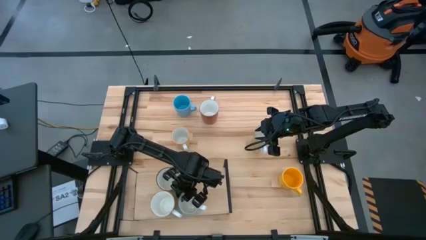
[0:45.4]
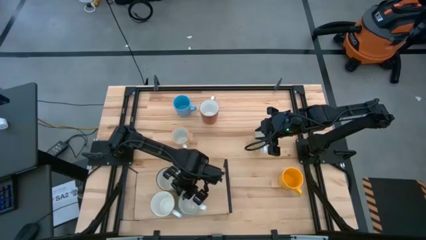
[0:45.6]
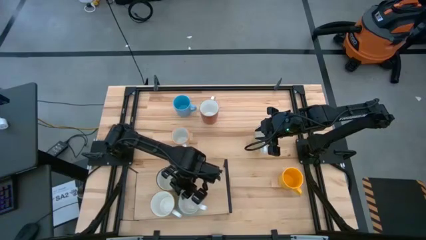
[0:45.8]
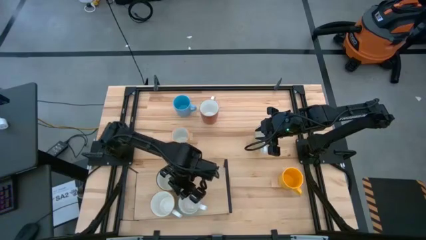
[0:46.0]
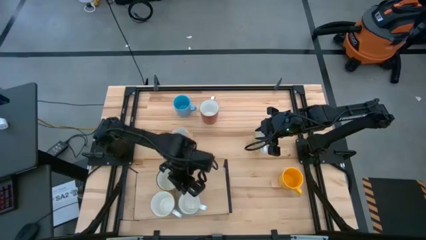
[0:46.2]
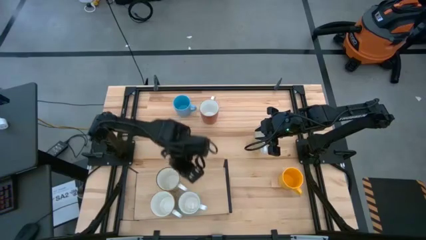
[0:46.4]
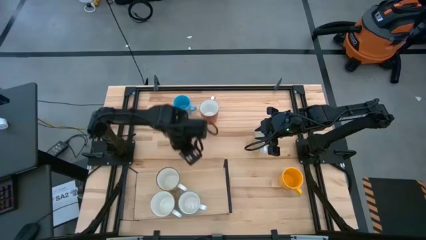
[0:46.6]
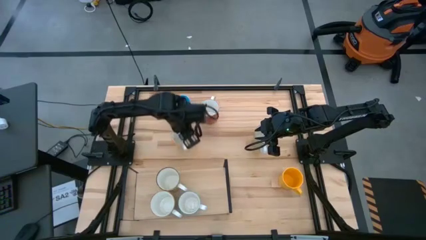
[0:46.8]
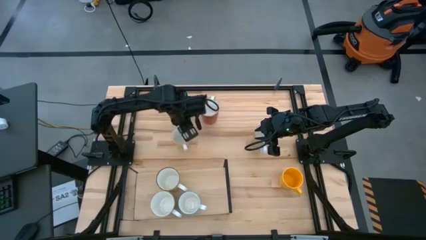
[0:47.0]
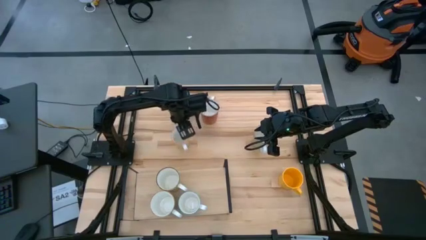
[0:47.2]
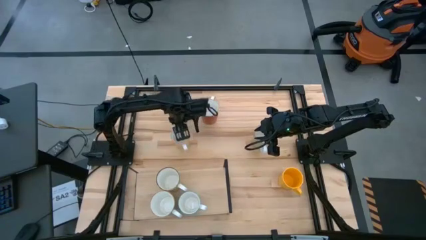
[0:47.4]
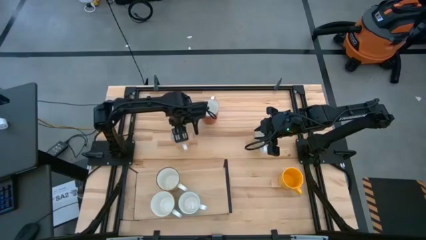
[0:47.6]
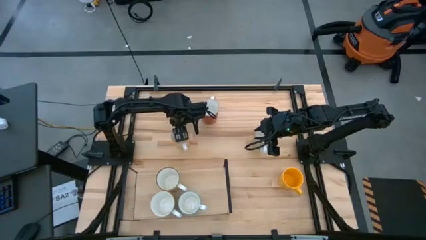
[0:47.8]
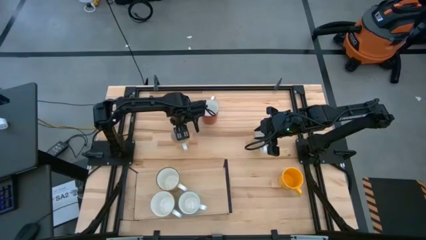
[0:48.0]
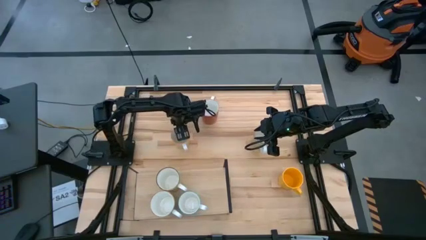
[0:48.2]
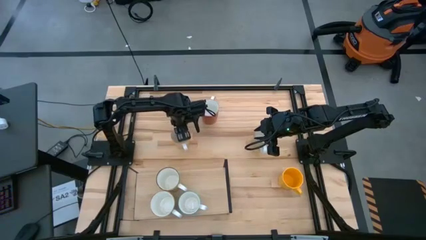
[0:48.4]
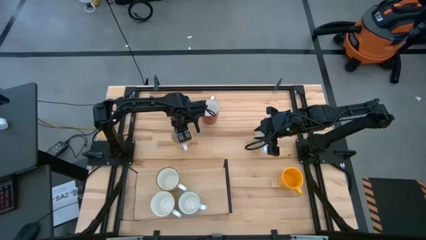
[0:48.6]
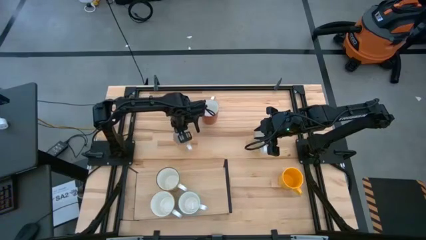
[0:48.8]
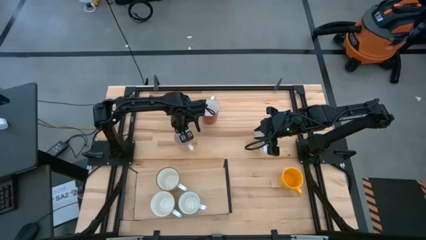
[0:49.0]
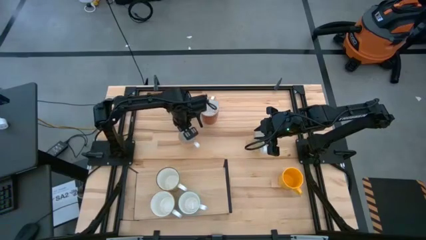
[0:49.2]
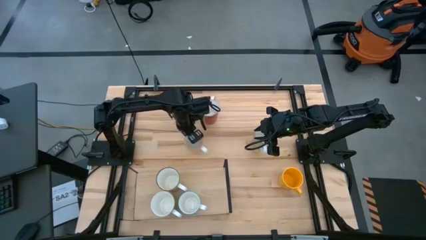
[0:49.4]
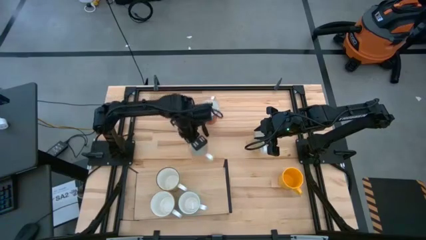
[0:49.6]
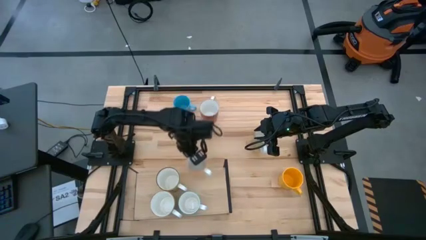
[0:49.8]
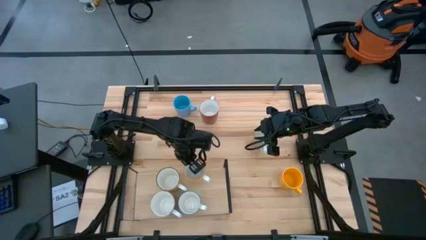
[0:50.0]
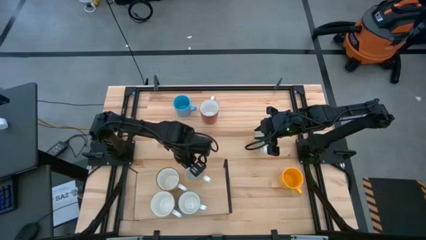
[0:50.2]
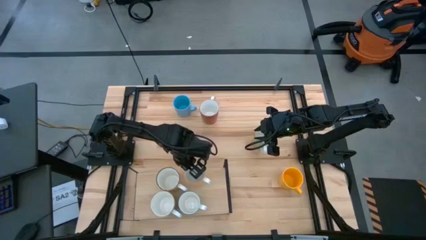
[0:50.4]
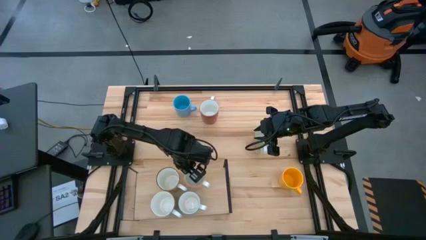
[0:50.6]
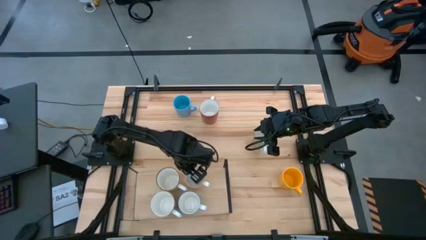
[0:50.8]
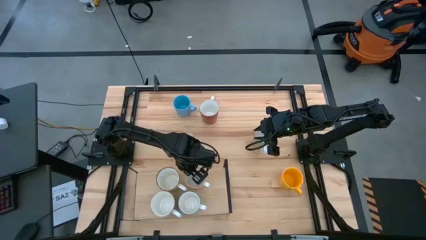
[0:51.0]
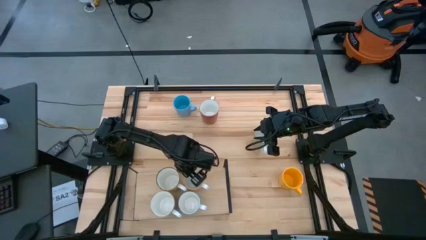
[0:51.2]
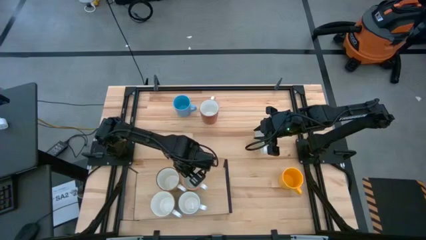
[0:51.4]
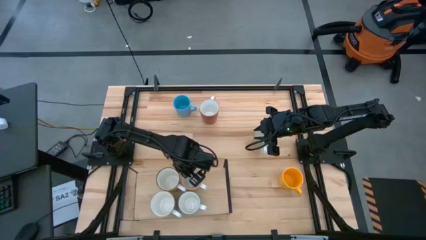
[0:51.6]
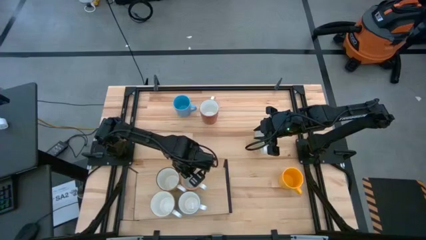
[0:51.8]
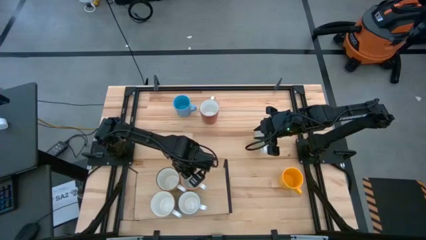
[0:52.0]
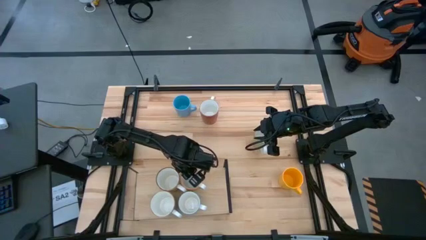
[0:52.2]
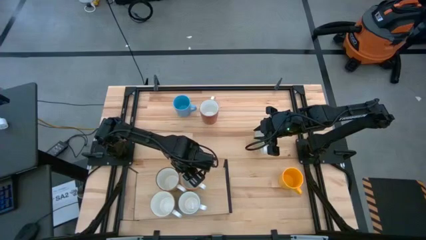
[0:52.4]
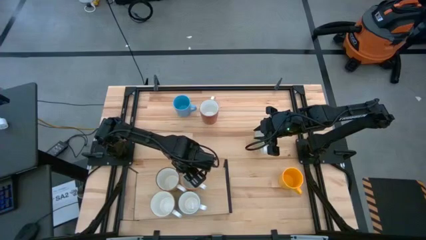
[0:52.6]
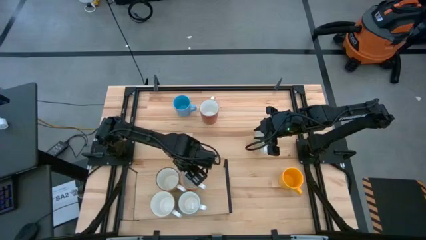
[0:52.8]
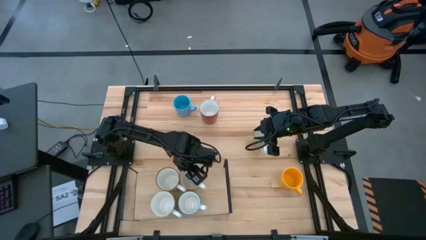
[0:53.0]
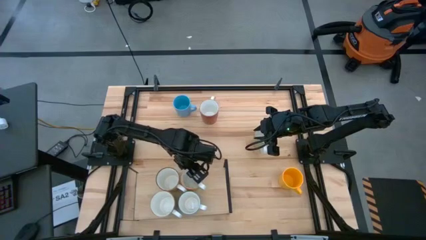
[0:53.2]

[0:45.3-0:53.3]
Task: Place coffee mugs
Put the yellow patterned mug on the shelf

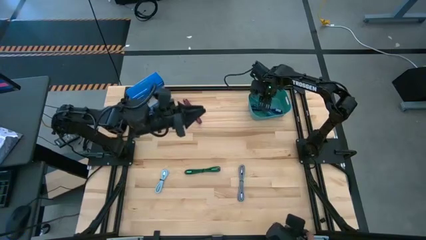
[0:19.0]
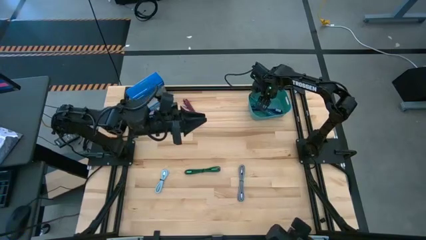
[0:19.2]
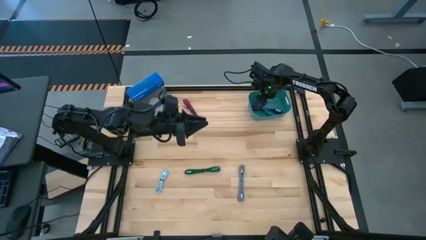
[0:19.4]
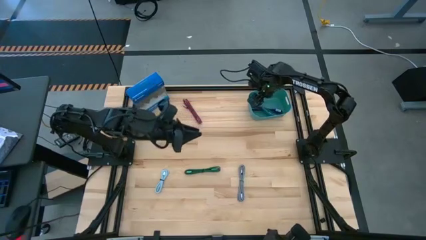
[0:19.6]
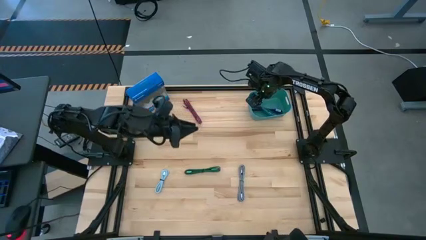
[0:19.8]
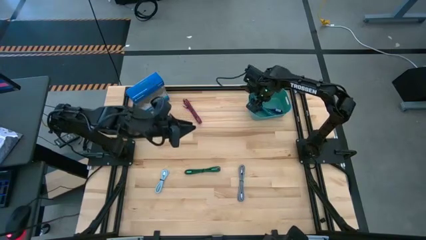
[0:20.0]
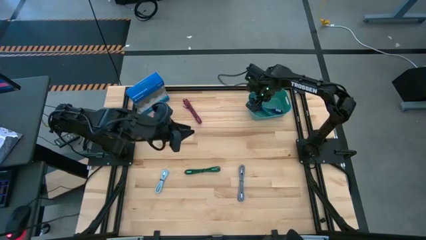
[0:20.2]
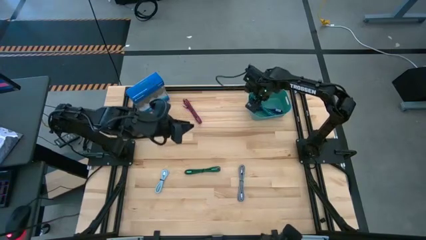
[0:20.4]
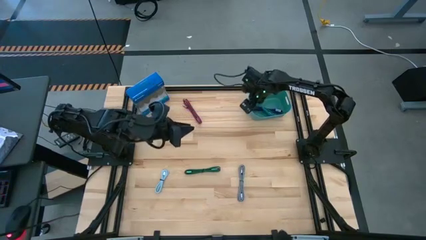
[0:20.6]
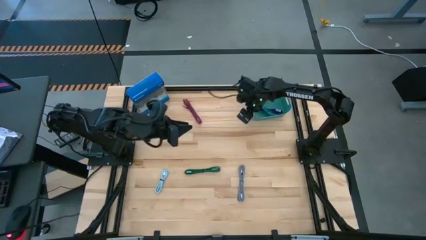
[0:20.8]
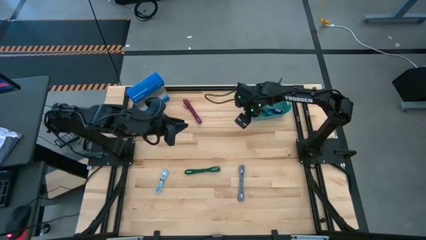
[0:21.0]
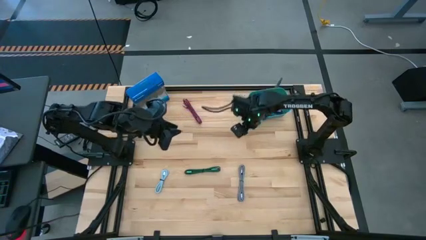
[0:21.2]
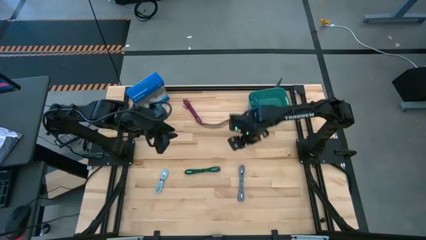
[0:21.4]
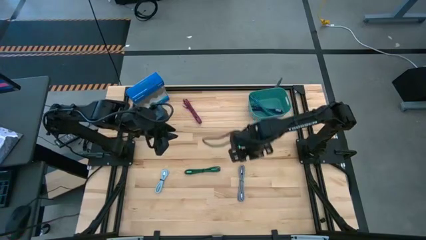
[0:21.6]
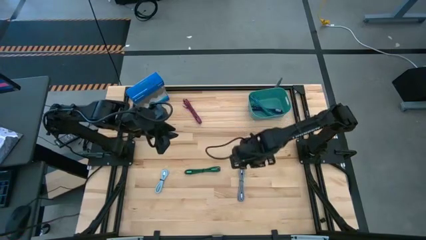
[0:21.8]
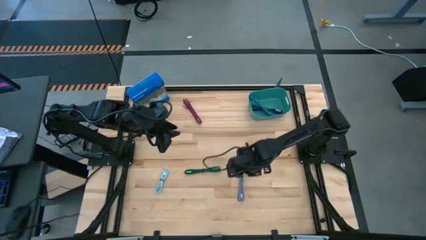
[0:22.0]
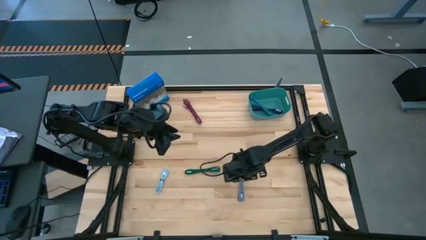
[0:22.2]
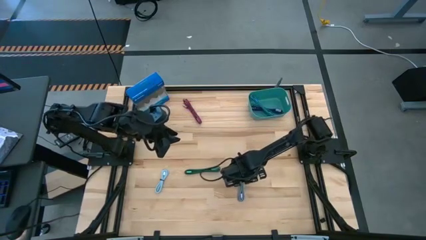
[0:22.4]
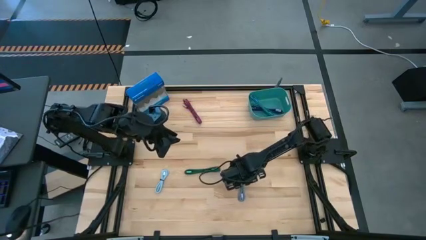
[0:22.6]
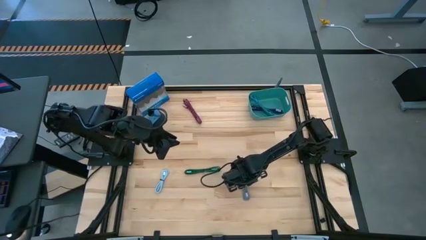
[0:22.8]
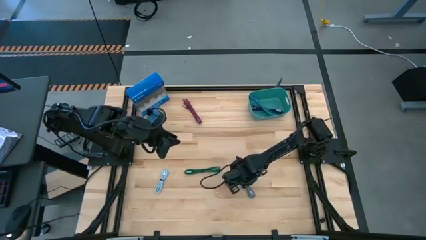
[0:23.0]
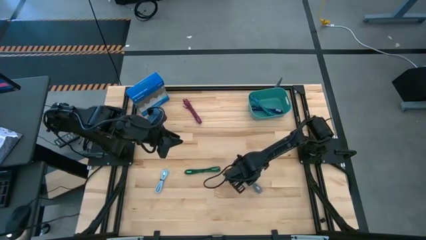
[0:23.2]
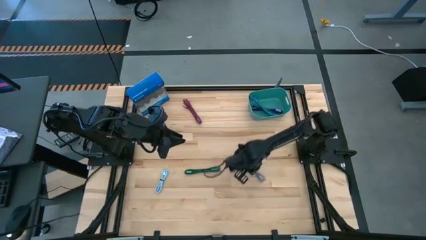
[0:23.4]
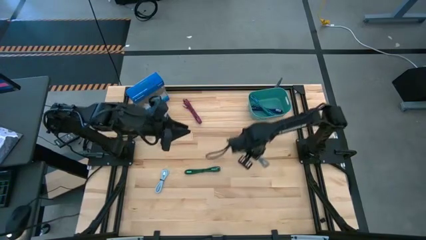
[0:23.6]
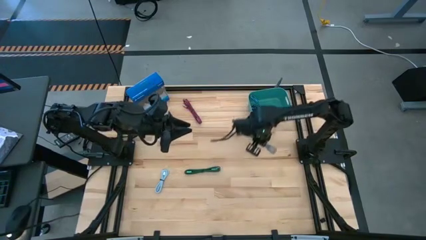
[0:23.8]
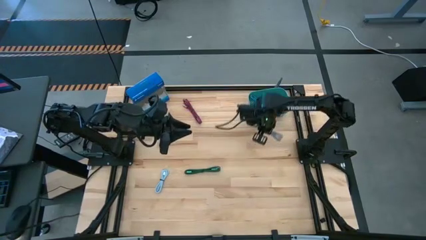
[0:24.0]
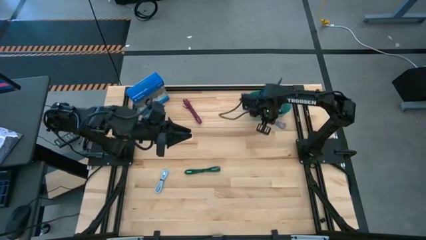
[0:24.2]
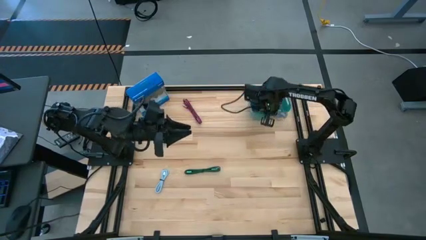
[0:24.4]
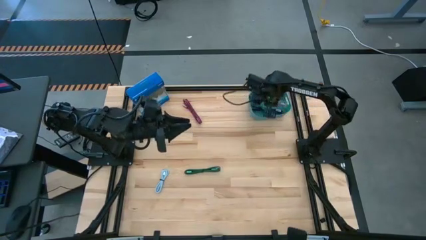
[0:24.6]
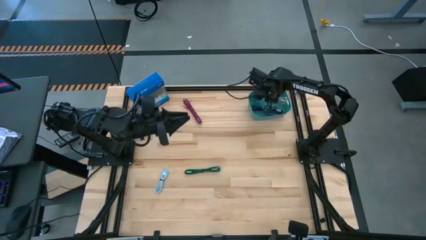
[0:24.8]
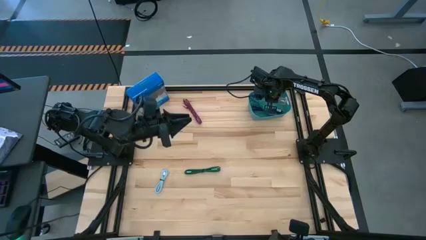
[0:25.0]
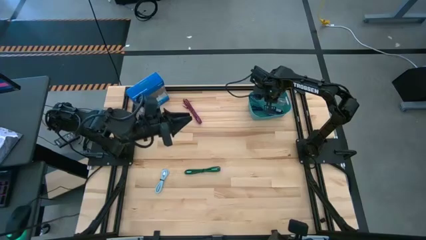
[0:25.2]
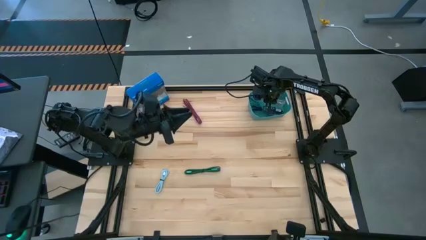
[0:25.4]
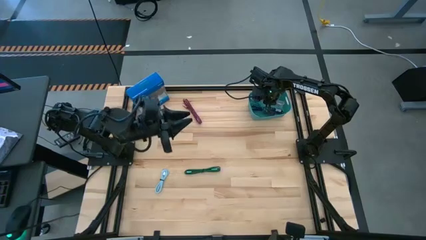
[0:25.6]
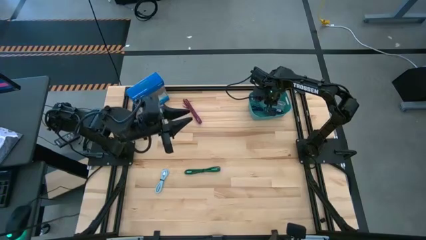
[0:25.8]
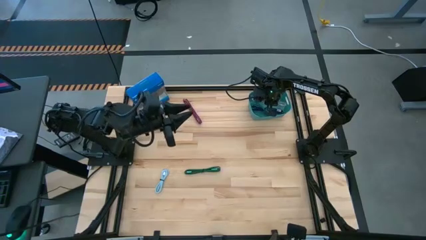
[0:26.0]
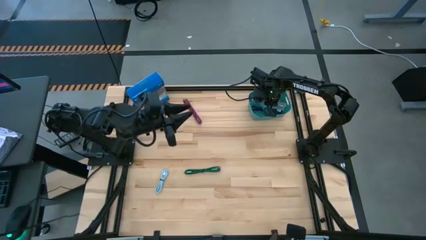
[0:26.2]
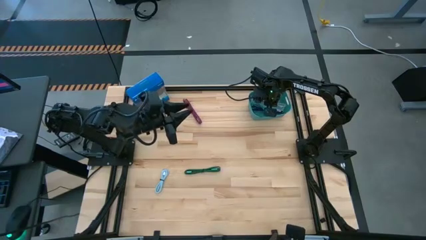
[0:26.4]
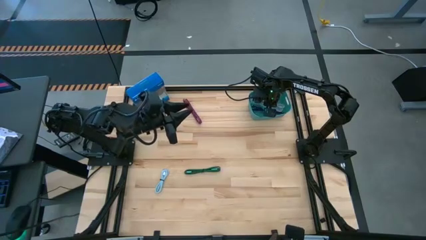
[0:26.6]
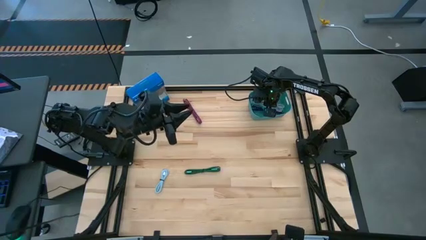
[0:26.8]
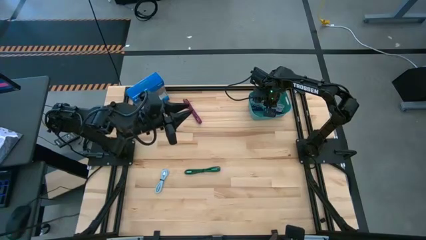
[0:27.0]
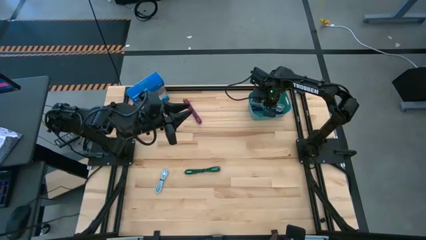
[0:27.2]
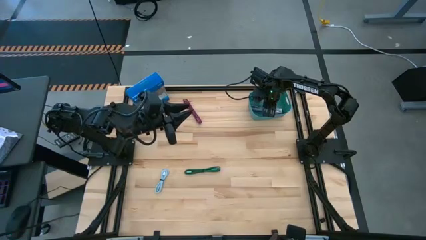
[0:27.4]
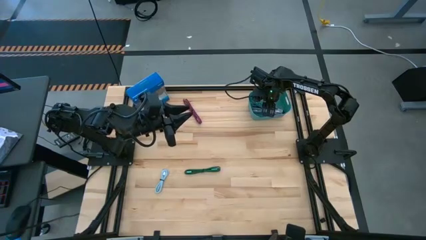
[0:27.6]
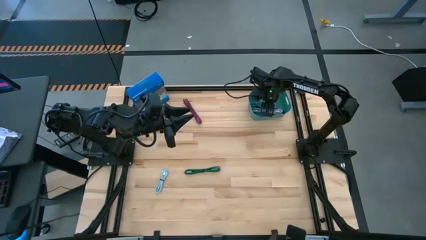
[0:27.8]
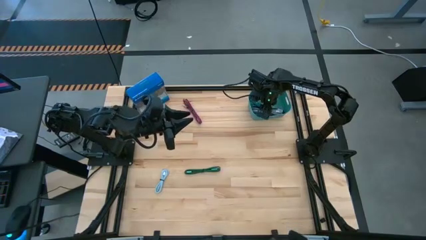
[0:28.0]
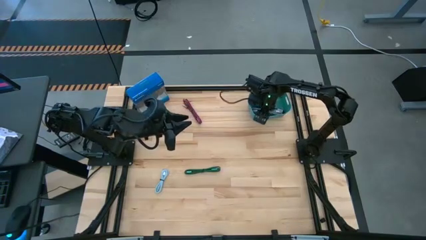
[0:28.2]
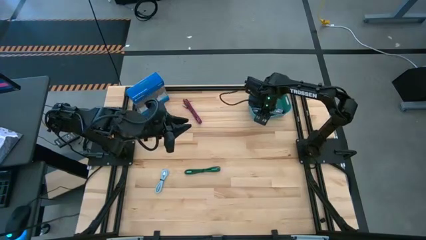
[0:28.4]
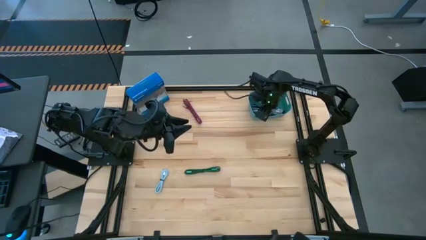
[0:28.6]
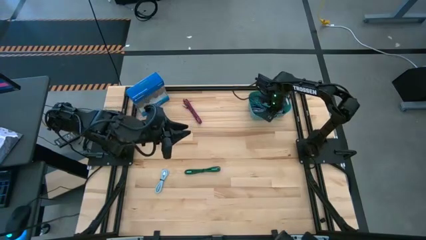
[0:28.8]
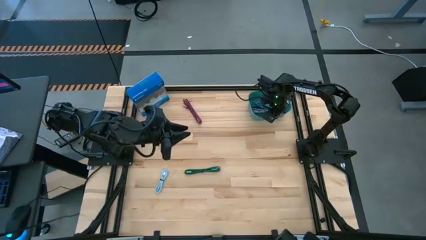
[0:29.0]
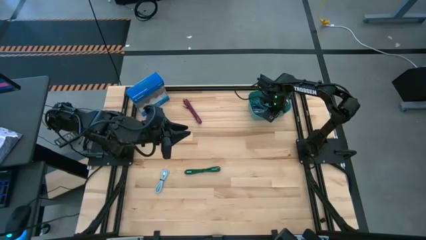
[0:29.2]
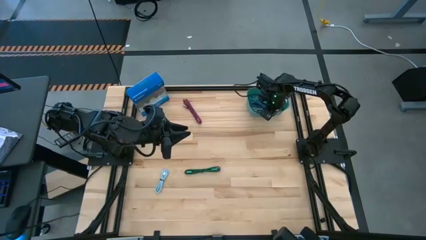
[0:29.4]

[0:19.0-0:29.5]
Task: Pick and place USB-C Cables
Put the black charger cable into the green bin
